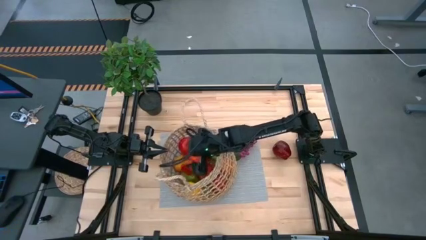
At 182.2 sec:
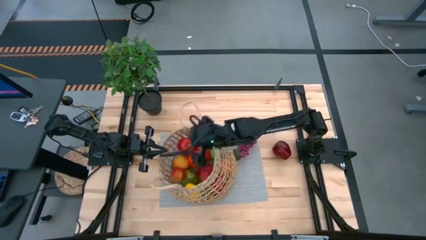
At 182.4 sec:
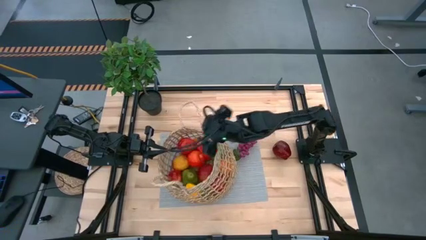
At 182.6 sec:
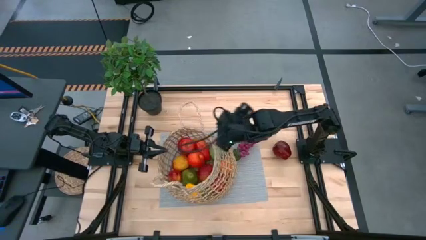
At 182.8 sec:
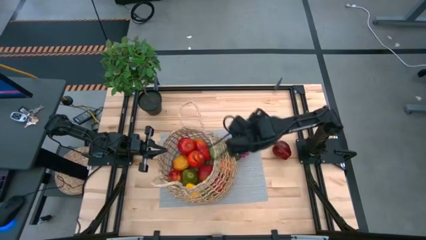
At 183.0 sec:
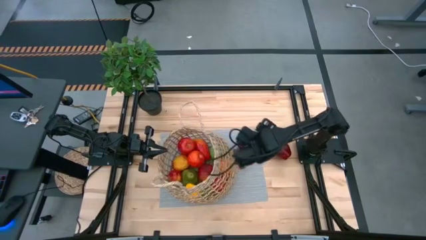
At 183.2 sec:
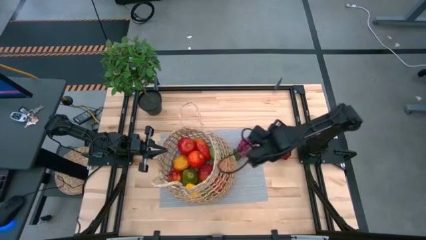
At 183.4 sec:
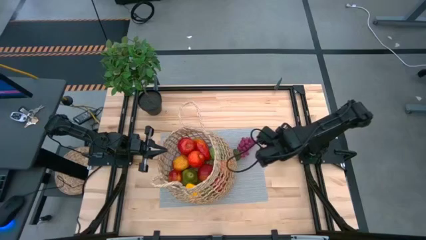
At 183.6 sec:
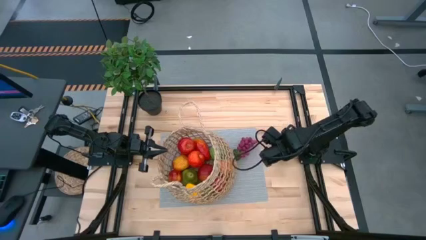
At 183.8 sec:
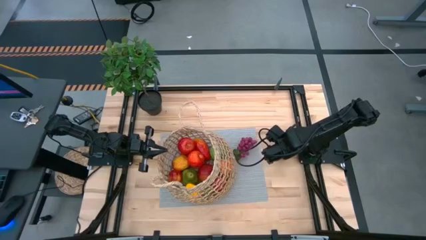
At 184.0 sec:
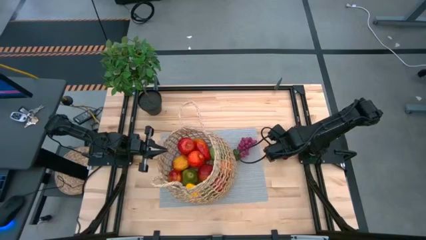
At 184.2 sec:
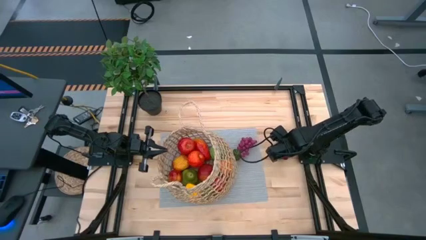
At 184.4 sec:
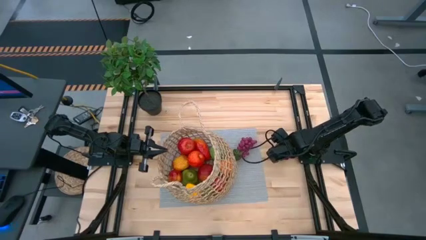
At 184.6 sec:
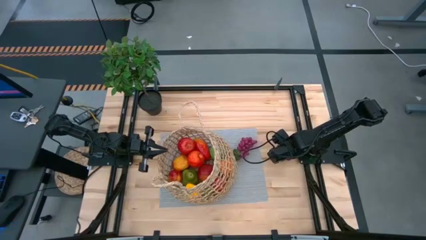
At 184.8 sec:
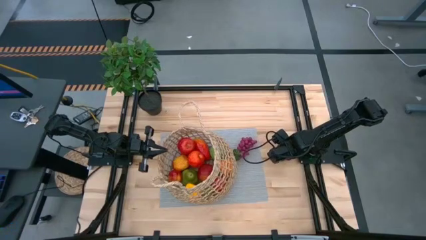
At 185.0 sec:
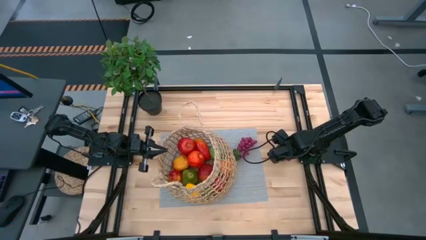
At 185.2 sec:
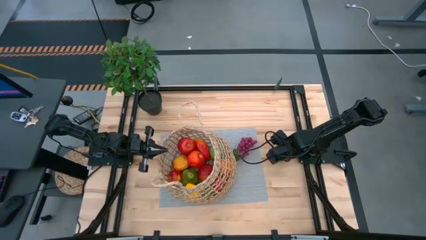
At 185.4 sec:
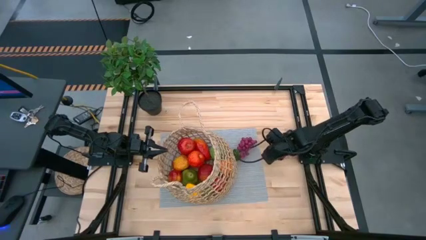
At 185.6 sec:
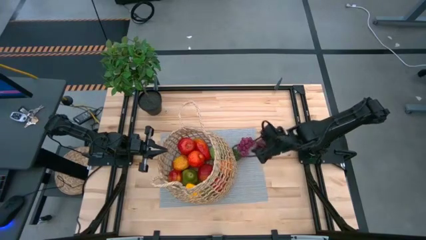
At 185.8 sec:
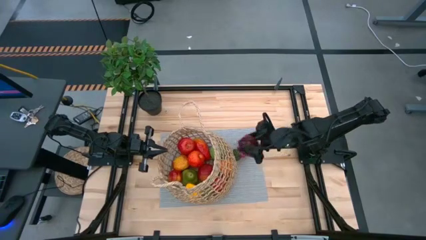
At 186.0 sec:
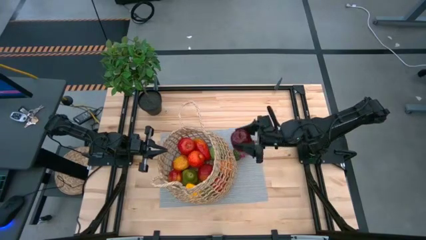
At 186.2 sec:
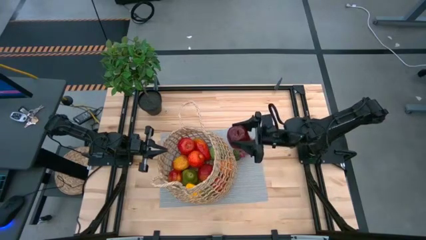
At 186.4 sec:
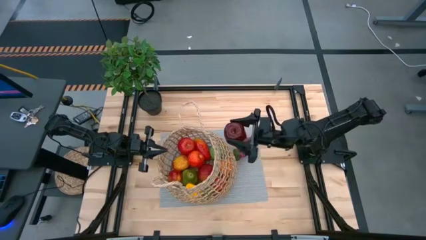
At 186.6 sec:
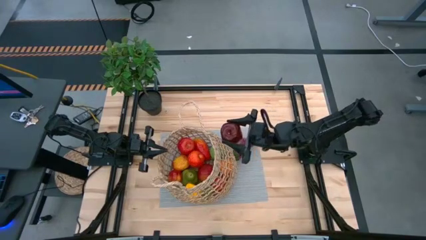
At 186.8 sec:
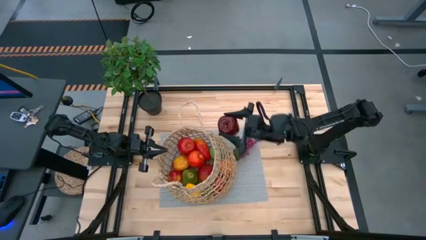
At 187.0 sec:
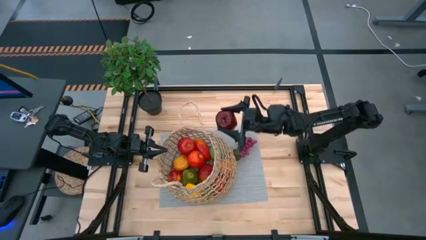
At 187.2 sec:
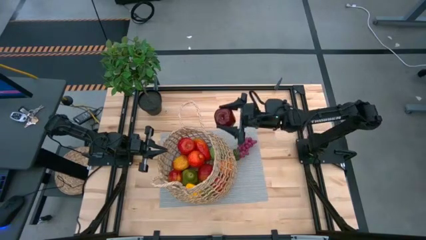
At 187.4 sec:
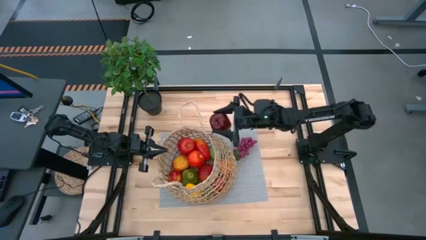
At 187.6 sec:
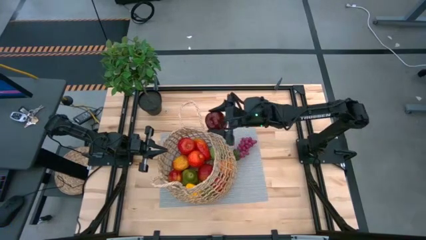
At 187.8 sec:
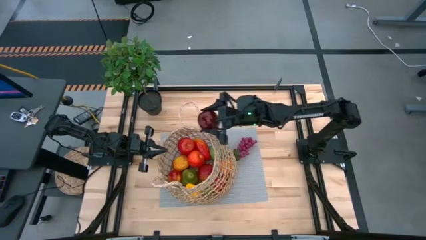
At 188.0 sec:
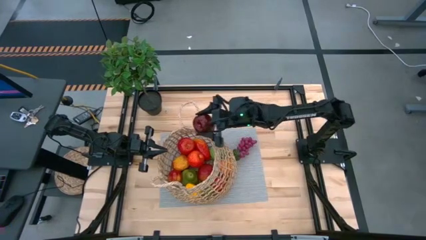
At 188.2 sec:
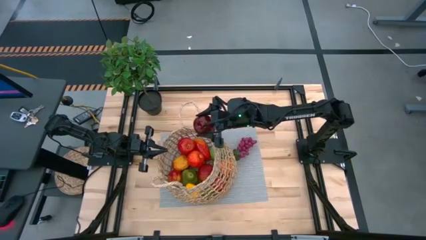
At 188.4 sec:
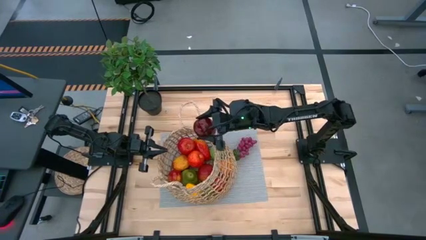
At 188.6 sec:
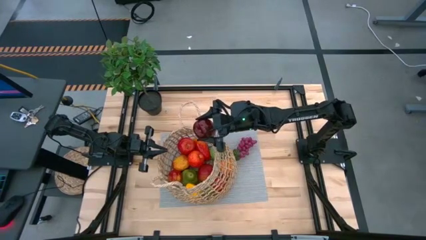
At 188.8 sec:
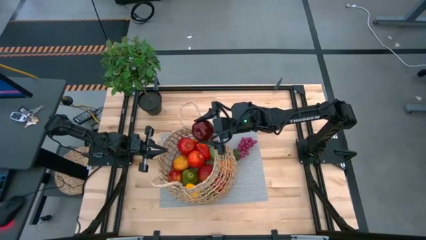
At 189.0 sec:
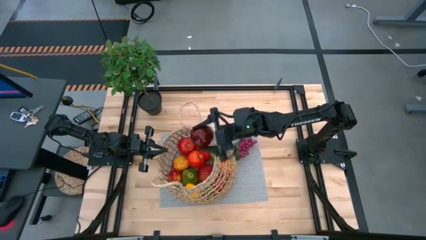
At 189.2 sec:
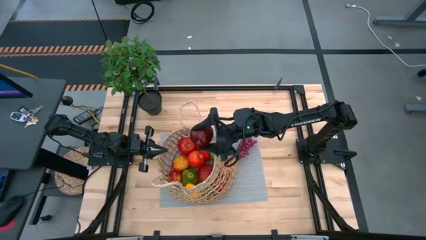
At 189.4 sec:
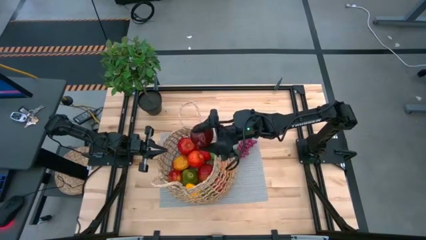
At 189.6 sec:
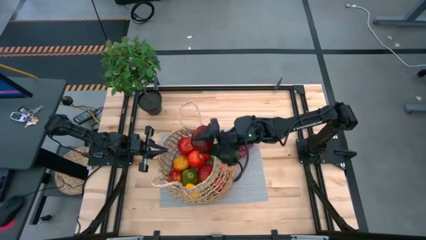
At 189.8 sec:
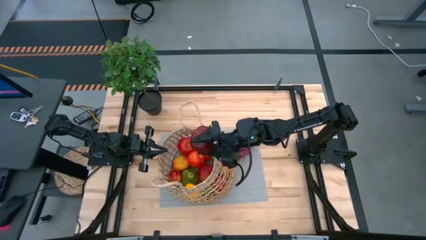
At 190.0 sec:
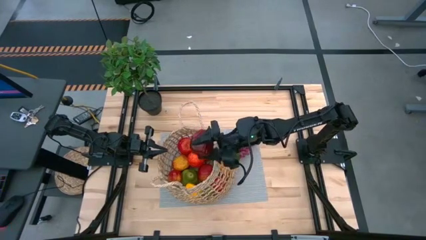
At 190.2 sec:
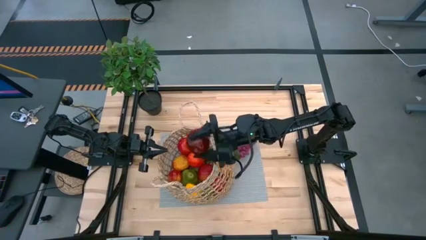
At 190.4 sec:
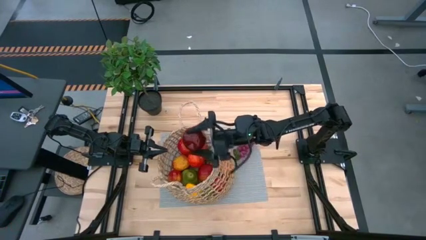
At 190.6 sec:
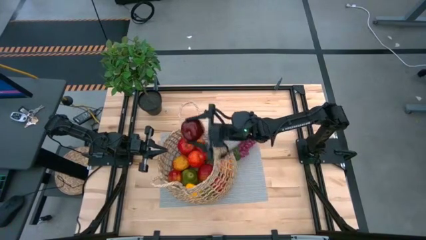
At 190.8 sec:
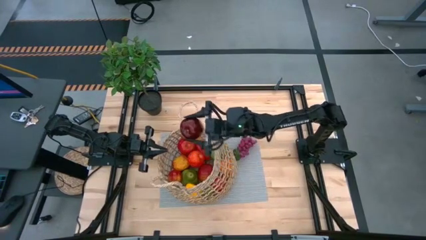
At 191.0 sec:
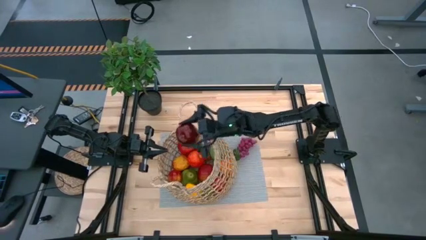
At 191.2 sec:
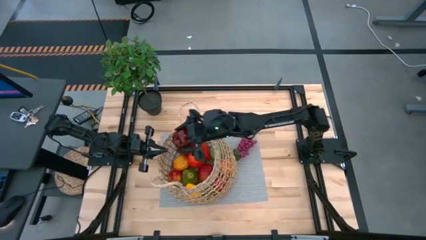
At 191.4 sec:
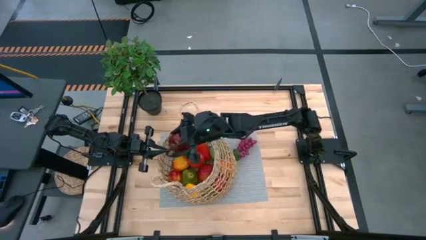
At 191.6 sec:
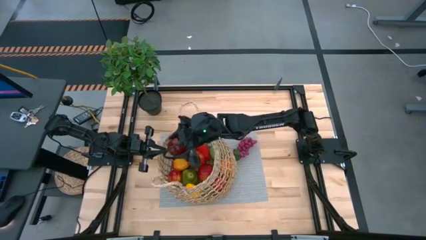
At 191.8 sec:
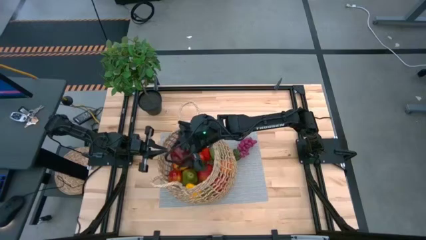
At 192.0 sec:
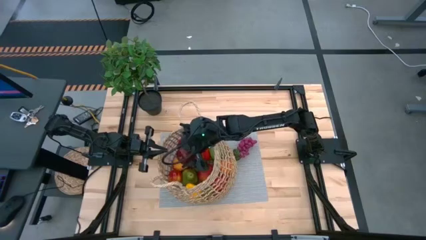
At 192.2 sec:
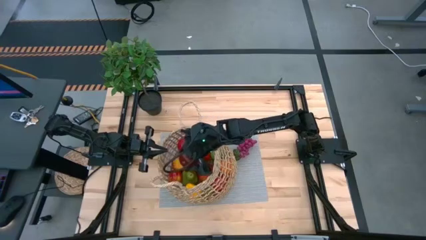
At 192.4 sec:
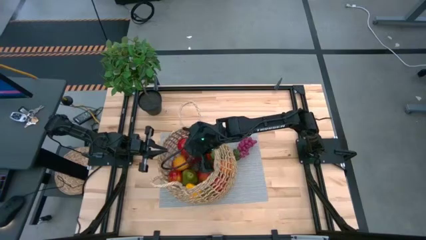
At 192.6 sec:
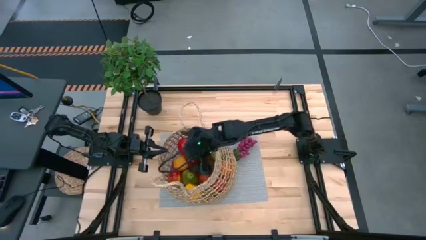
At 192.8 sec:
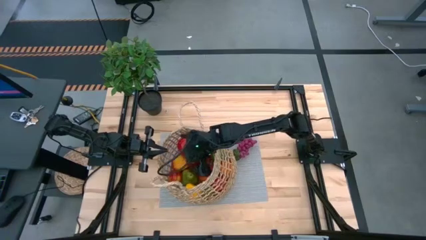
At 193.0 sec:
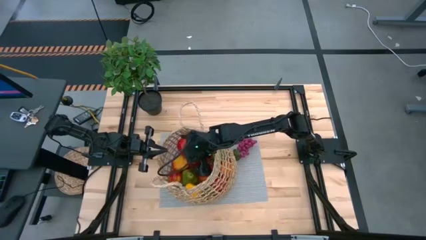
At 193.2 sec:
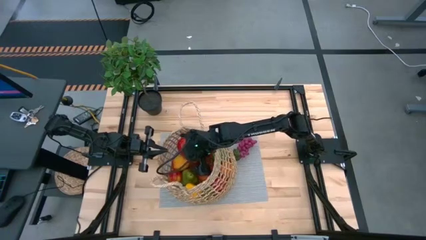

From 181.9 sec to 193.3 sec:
Task: Build produce basket
Put the red apple into the brown basket

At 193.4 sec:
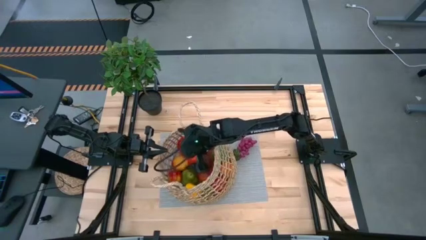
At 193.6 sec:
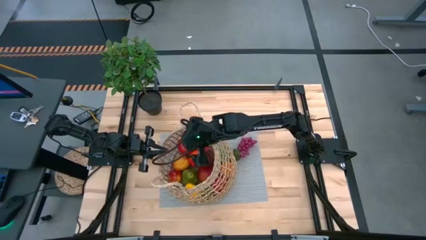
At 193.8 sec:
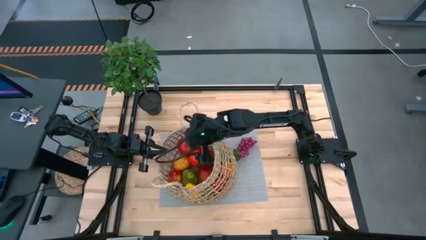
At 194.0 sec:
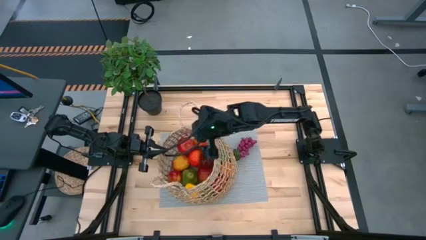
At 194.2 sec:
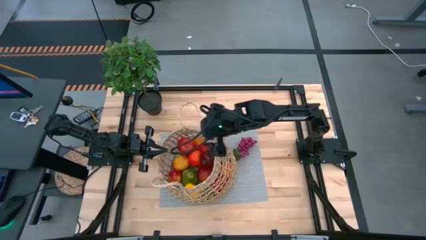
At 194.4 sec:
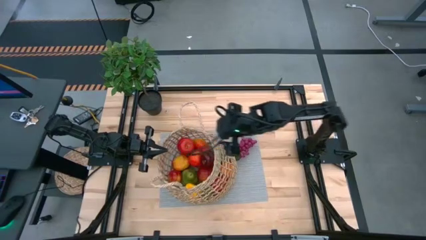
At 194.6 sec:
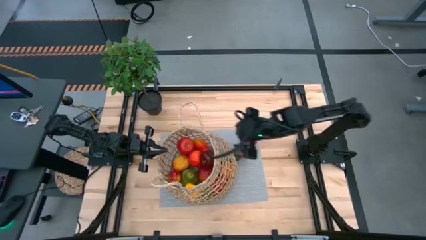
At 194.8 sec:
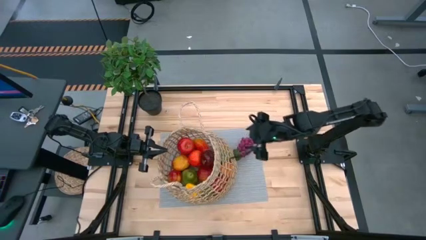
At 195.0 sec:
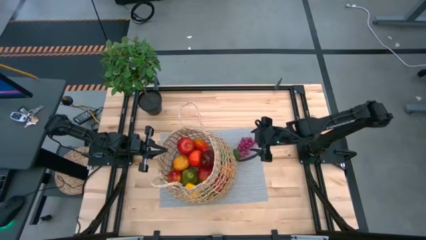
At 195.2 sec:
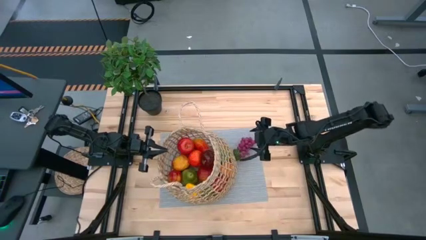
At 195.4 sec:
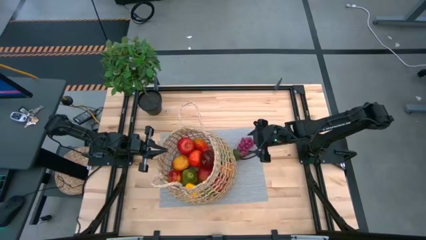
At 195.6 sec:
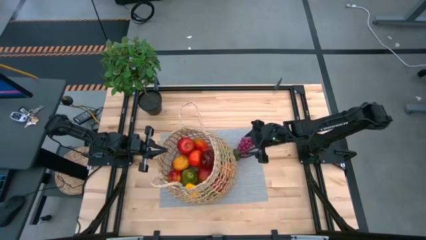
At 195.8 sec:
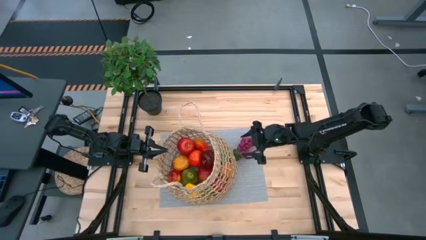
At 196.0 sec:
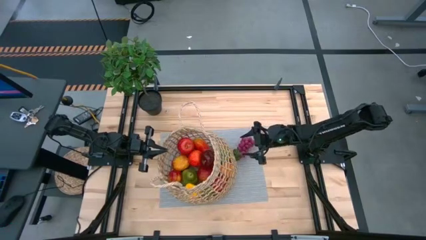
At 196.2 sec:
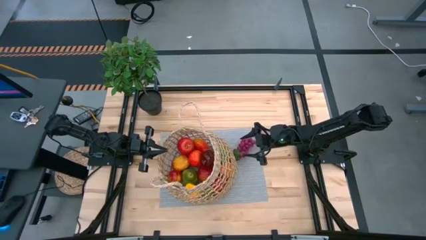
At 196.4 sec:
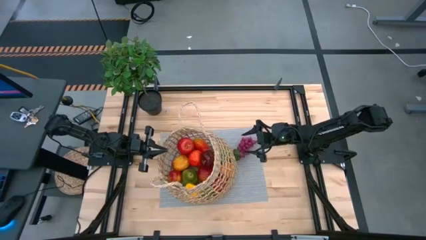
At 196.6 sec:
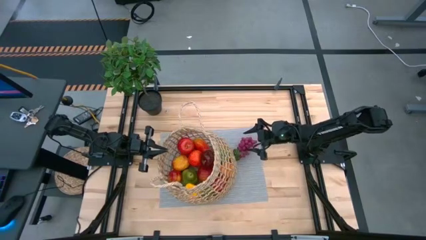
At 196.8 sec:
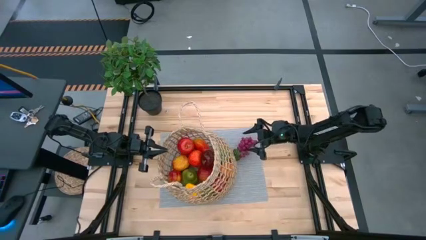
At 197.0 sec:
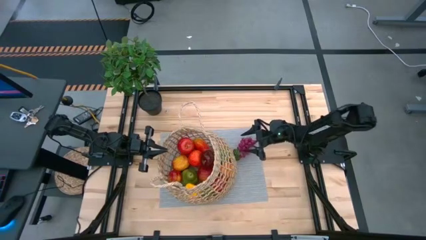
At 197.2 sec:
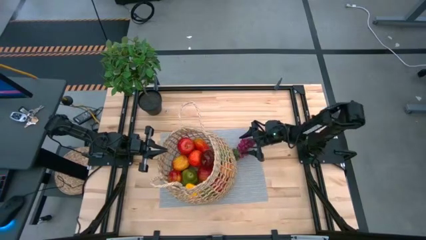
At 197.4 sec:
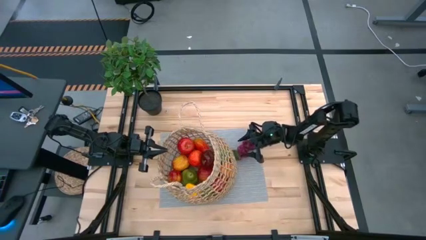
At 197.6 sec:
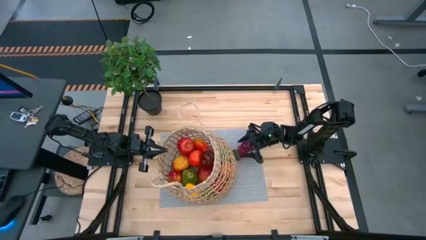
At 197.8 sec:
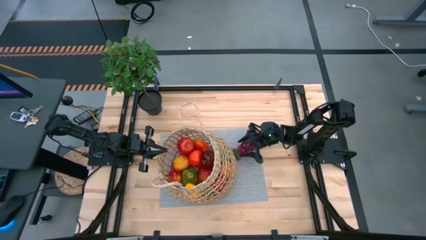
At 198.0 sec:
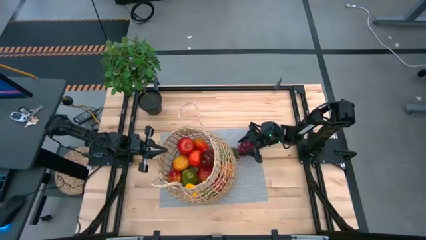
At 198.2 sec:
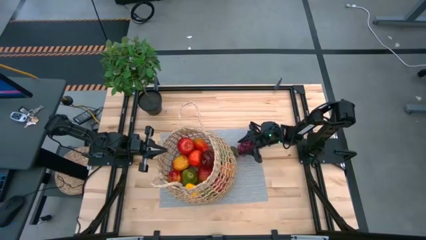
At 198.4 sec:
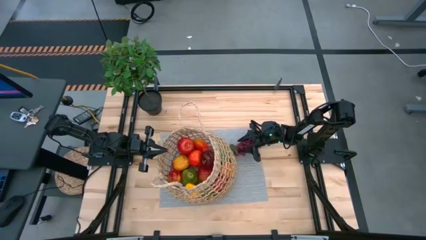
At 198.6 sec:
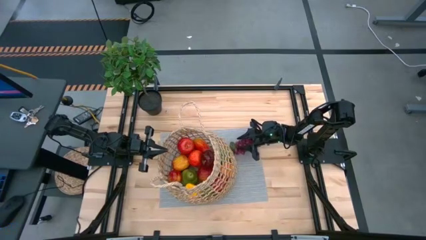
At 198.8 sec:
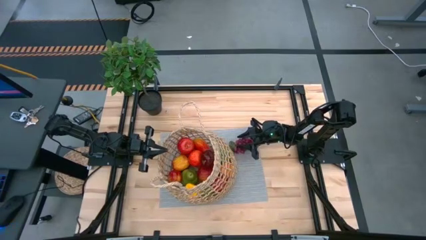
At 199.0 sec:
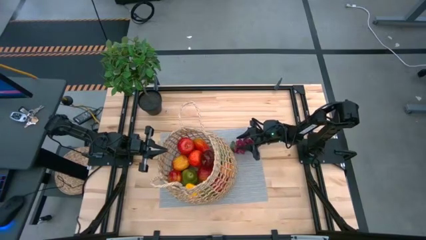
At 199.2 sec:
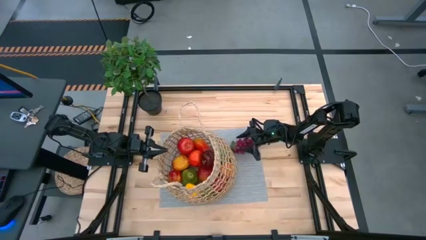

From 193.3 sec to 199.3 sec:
Put the grapes into the brown basket
